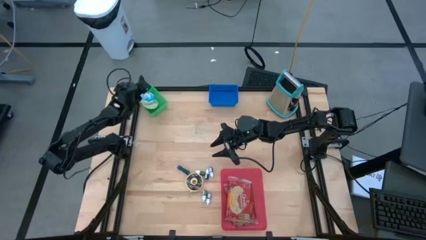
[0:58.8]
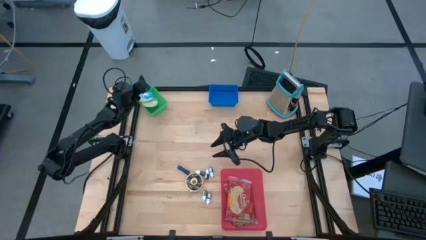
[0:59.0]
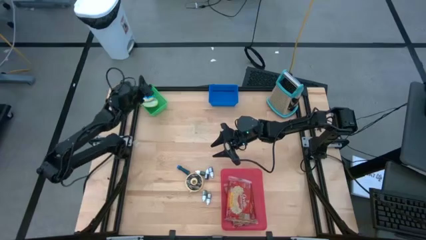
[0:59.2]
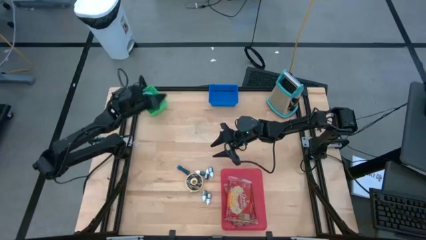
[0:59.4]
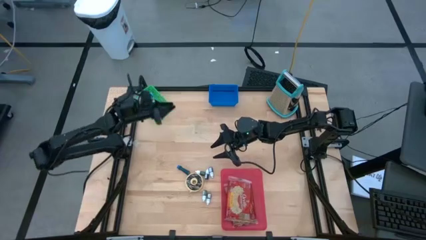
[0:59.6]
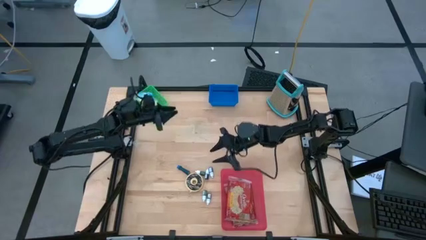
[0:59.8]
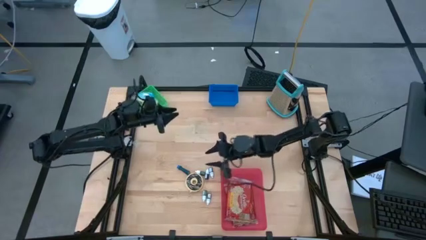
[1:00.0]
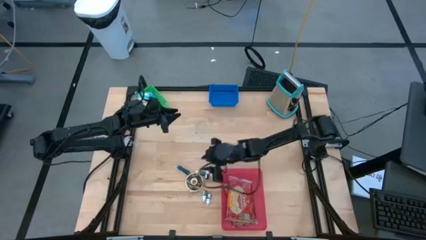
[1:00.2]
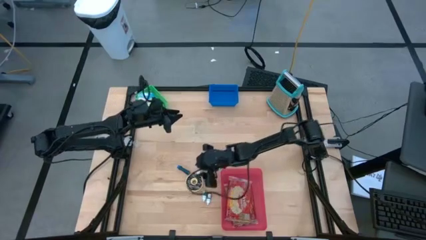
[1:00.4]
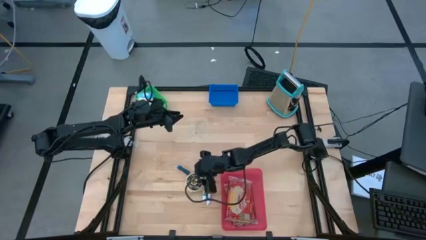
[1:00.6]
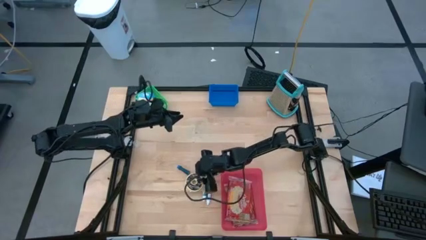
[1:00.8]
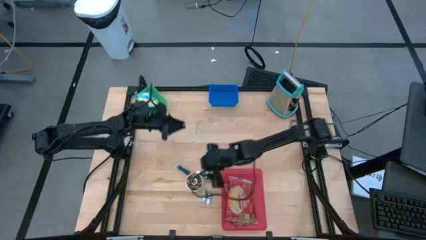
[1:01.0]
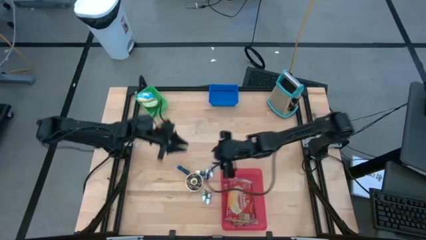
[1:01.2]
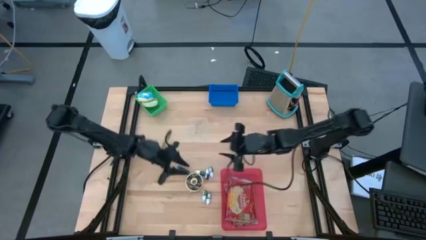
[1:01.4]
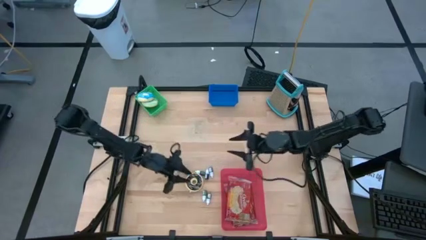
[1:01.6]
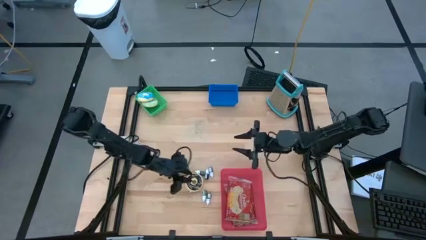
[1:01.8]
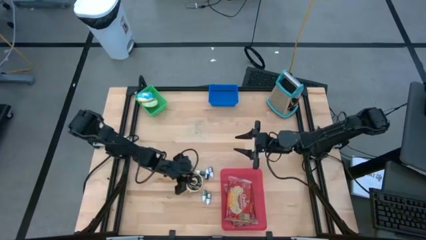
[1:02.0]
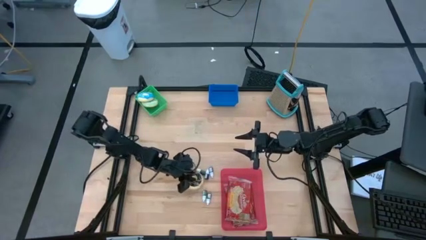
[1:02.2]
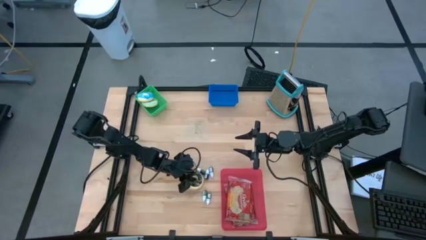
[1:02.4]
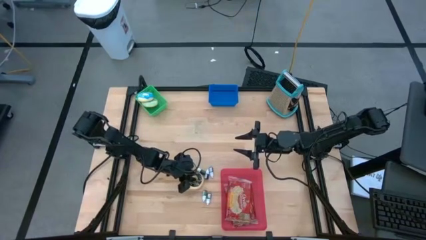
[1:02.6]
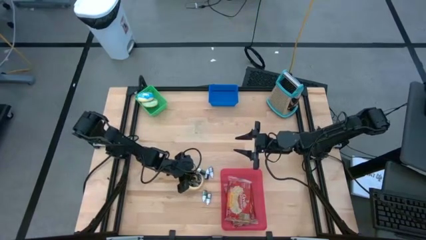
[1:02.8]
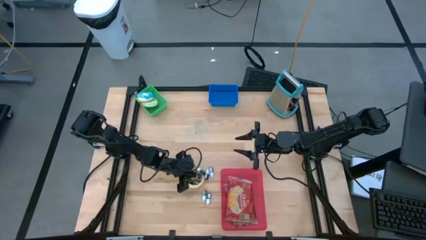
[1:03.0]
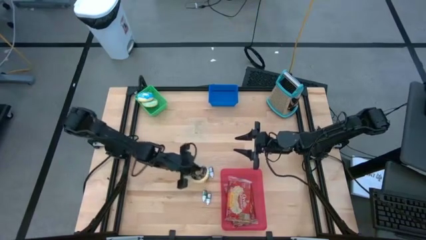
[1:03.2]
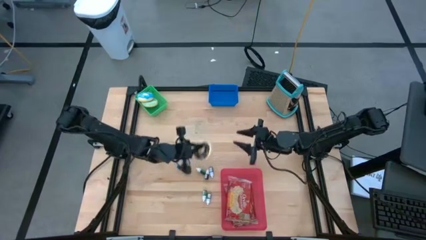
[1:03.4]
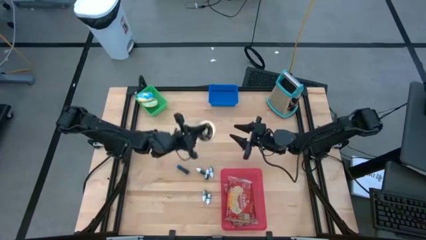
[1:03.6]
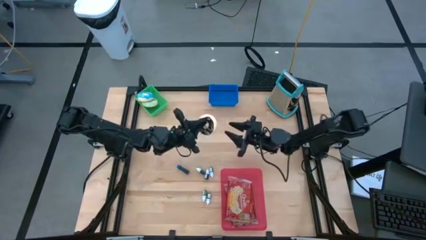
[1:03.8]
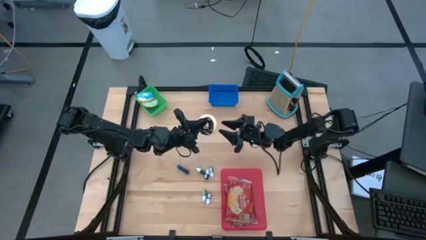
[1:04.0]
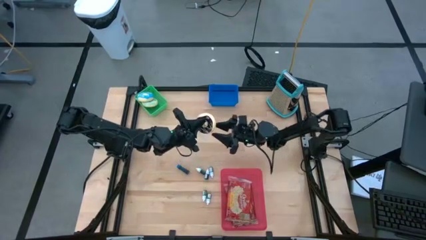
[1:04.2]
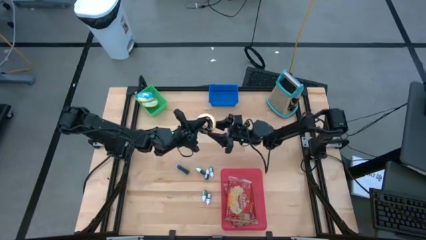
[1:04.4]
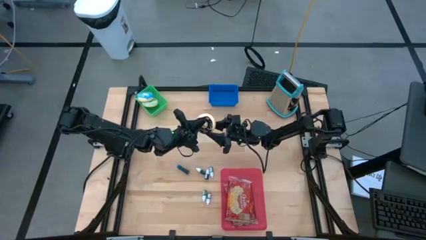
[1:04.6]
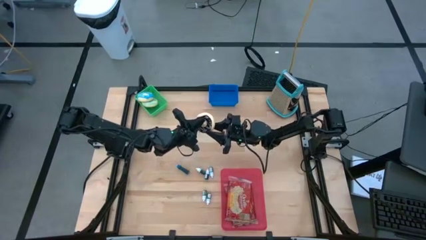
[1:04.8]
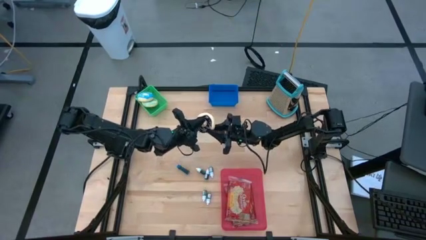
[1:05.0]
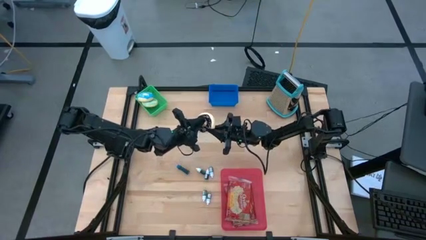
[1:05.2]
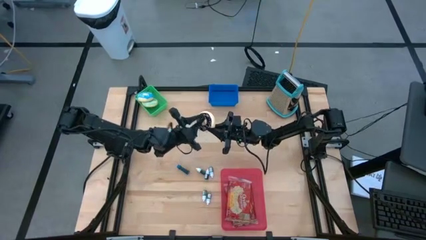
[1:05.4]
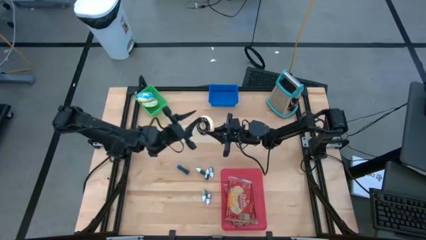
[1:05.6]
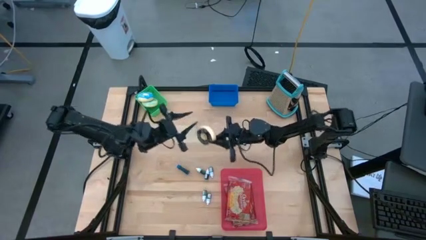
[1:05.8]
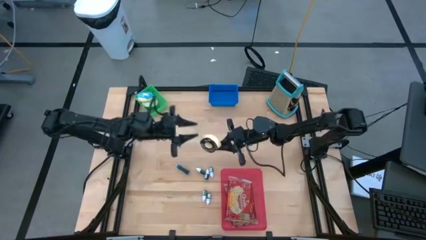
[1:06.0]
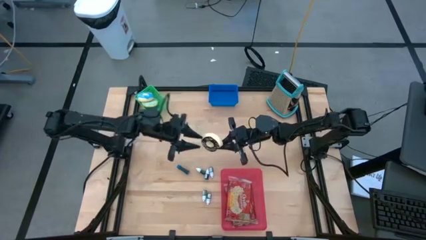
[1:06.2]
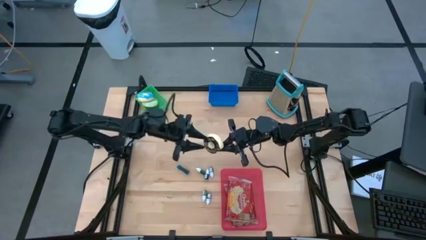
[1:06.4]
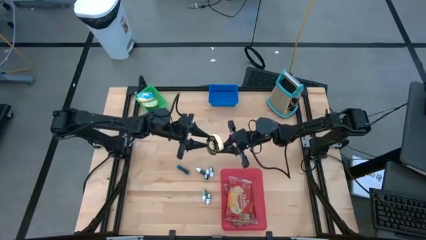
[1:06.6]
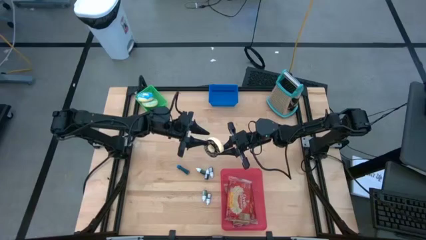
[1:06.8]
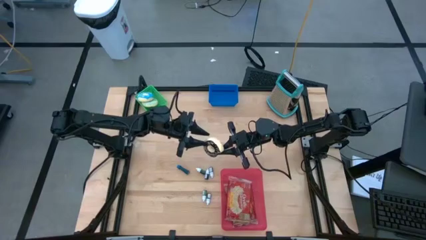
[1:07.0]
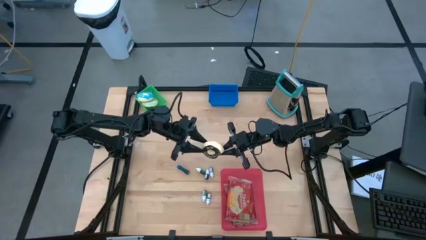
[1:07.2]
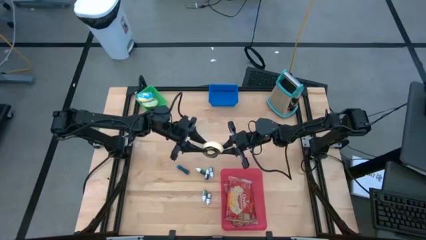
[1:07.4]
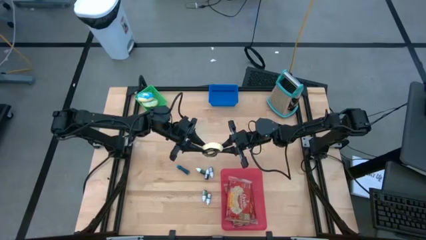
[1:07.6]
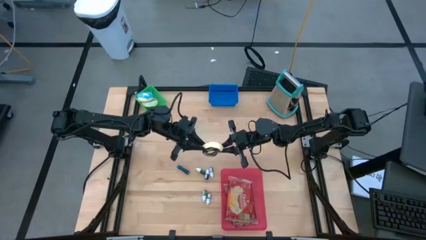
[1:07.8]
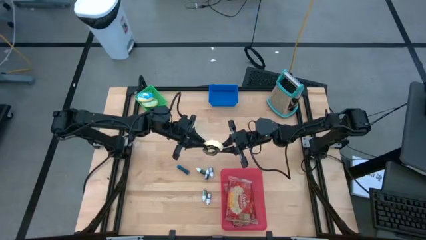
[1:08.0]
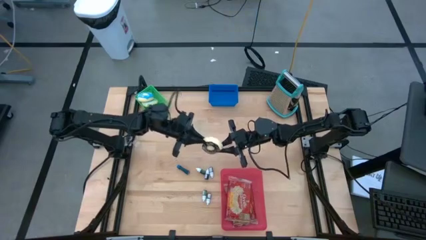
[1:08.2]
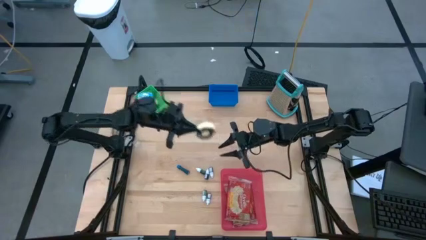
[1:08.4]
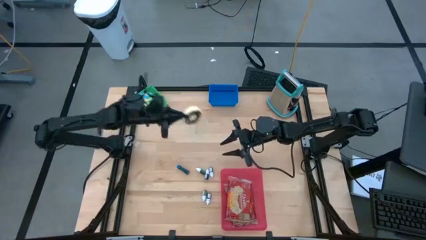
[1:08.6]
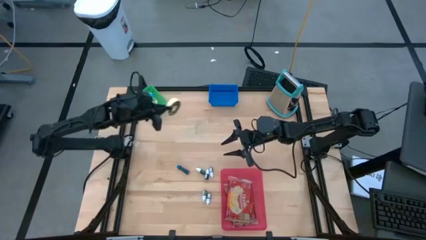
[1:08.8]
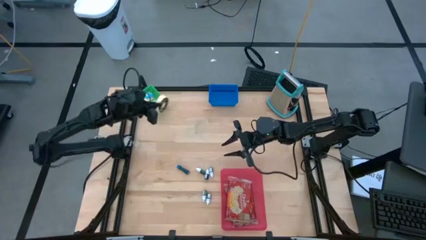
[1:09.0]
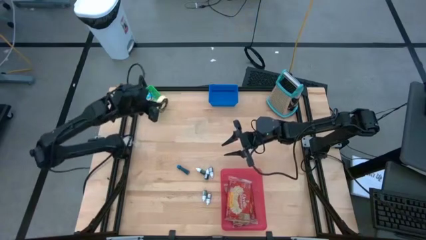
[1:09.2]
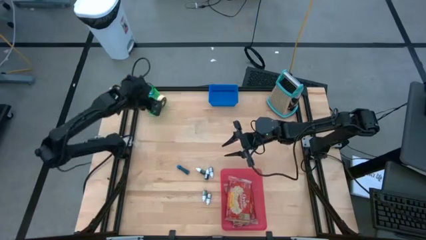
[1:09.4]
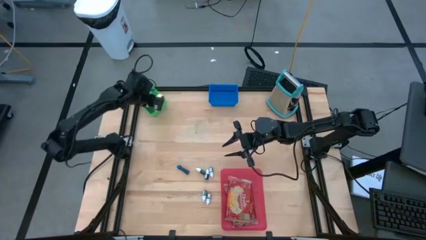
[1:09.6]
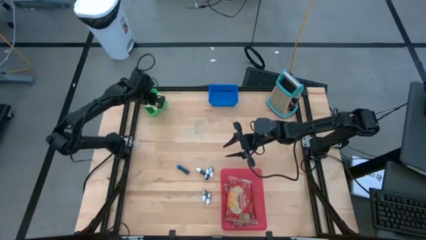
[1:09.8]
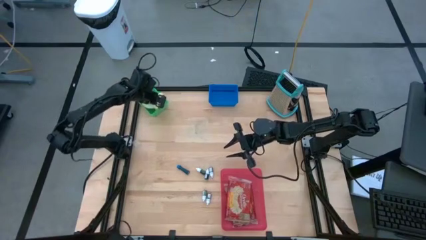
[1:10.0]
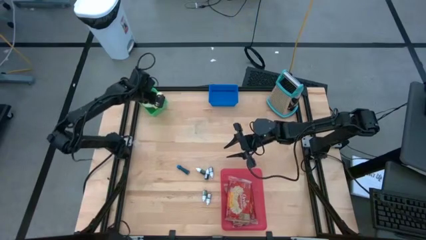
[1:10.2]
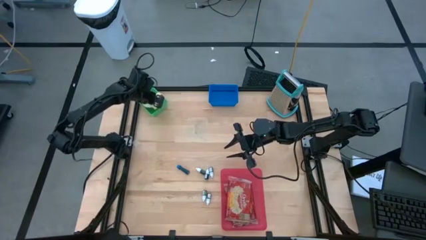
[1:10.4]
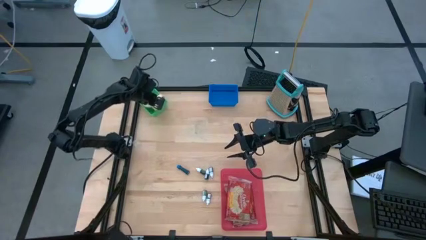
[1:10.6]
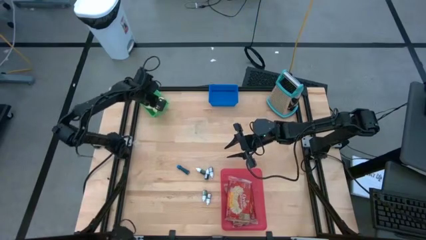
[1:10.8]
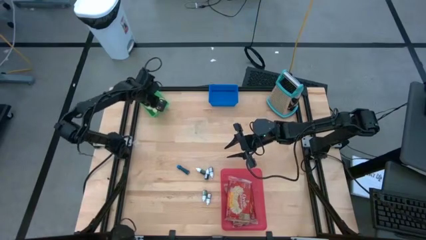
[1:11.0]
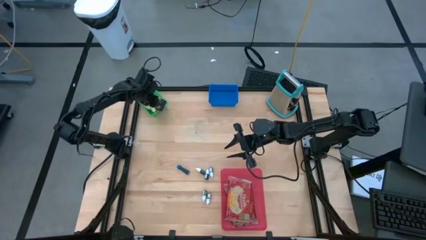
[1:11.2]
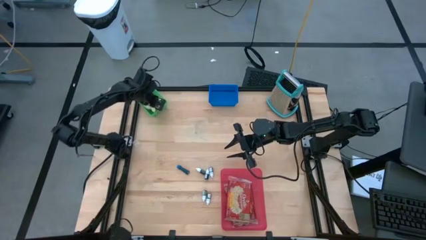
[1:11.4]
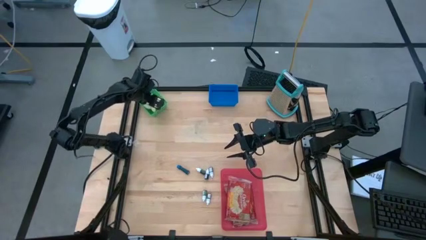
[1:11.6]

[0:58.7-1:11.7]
Put the black donut into the green bin
